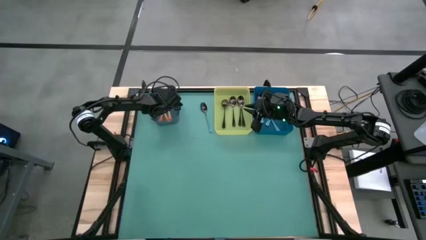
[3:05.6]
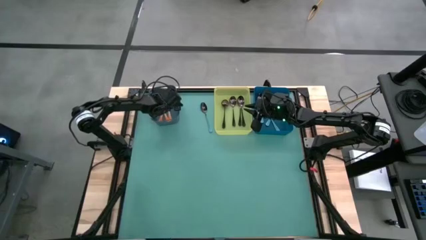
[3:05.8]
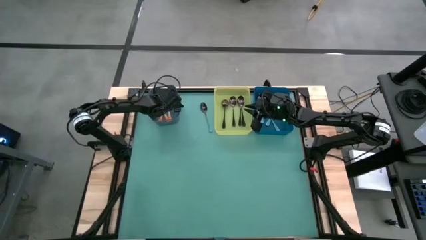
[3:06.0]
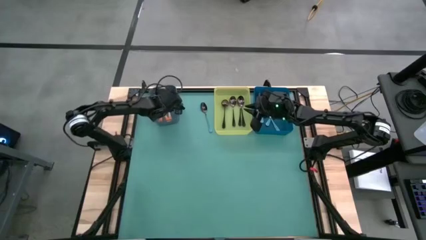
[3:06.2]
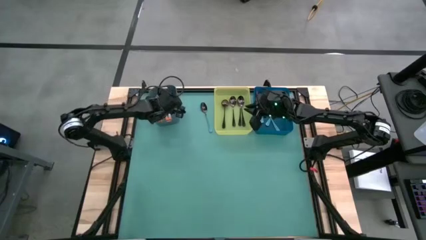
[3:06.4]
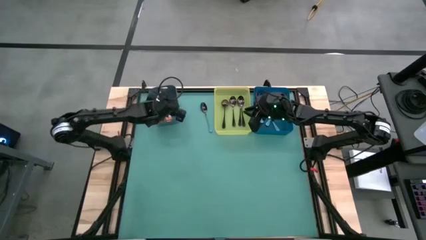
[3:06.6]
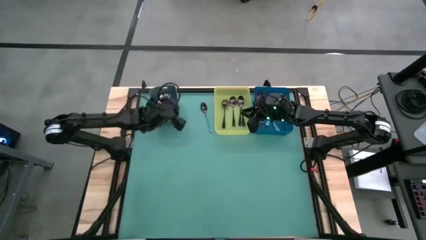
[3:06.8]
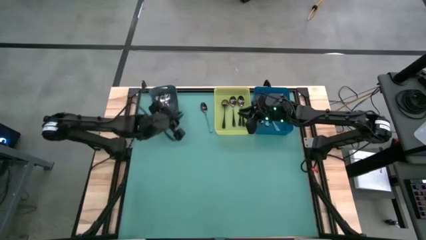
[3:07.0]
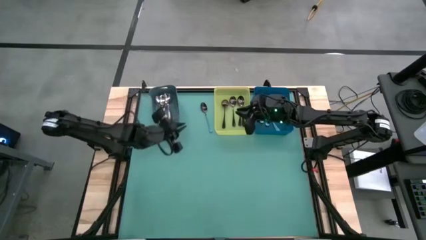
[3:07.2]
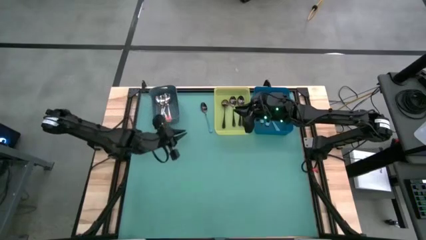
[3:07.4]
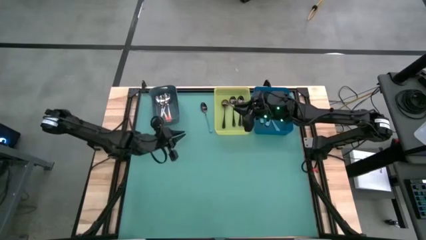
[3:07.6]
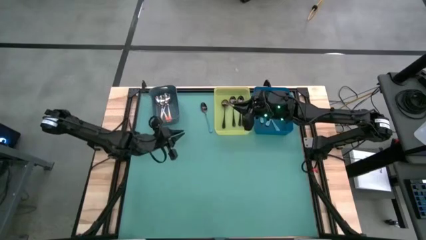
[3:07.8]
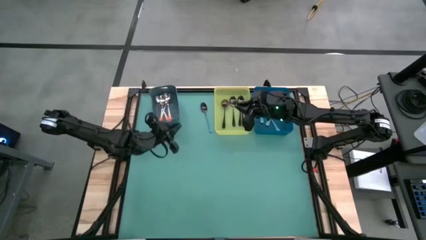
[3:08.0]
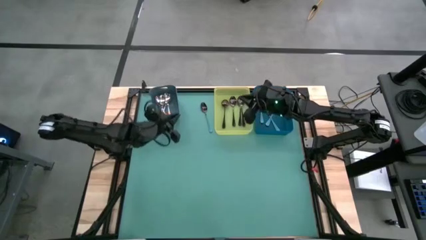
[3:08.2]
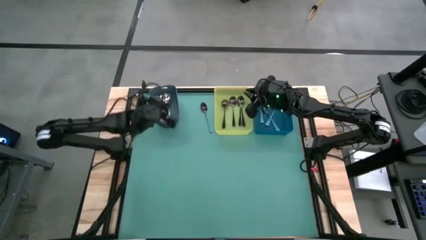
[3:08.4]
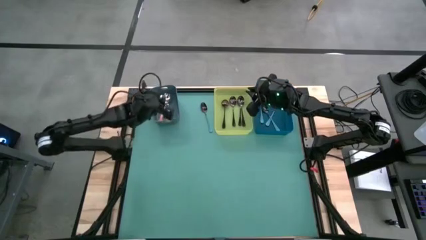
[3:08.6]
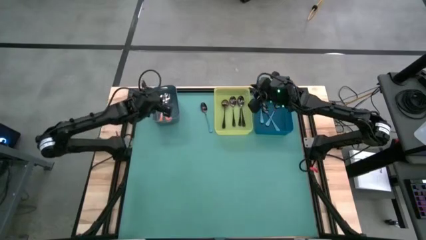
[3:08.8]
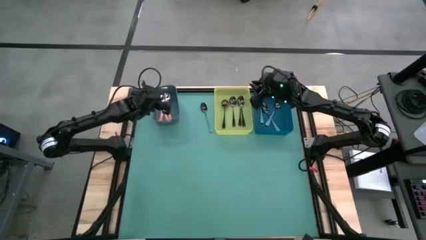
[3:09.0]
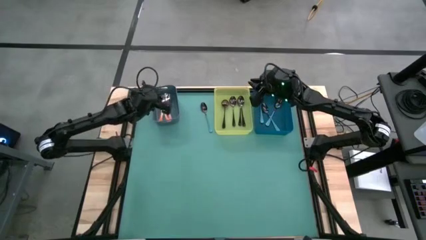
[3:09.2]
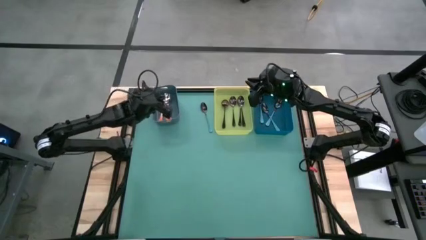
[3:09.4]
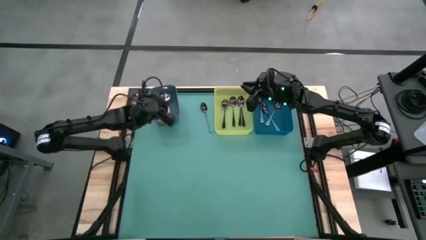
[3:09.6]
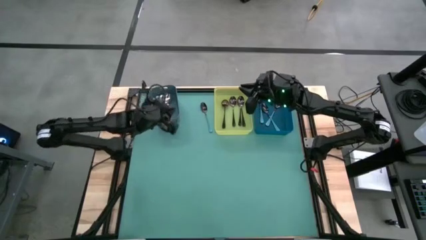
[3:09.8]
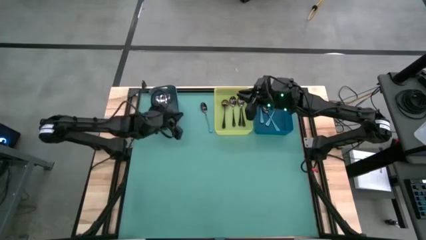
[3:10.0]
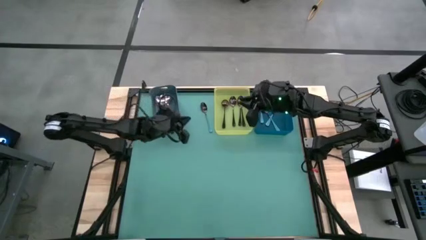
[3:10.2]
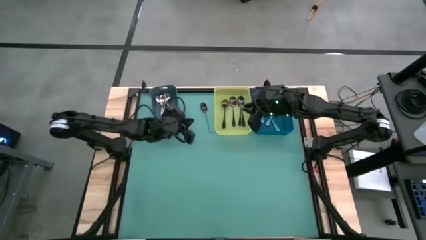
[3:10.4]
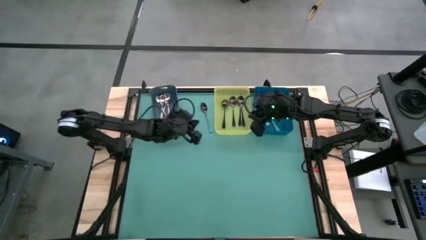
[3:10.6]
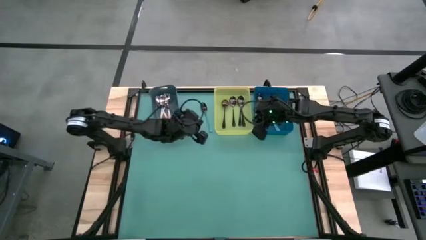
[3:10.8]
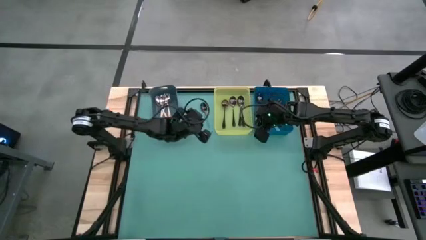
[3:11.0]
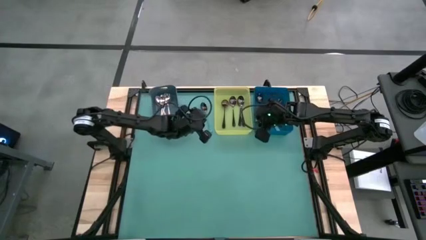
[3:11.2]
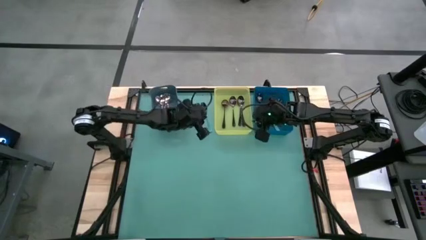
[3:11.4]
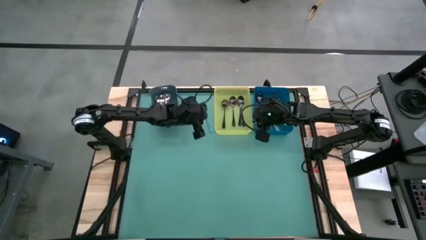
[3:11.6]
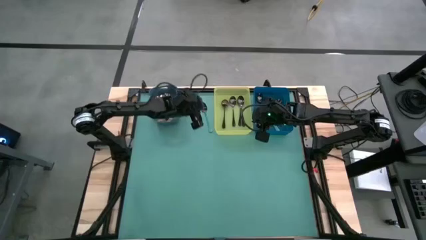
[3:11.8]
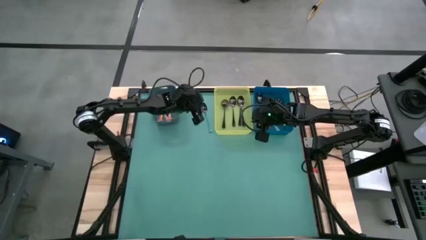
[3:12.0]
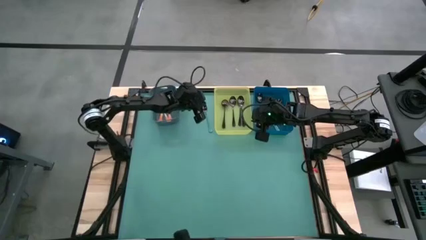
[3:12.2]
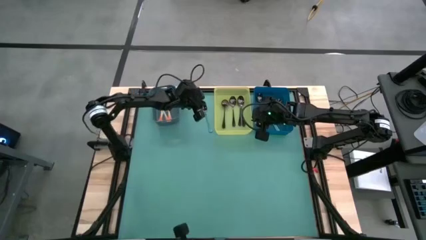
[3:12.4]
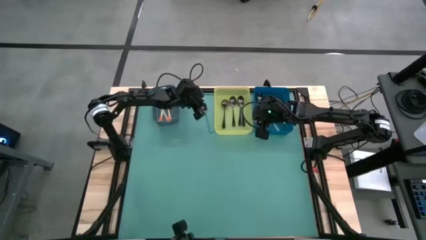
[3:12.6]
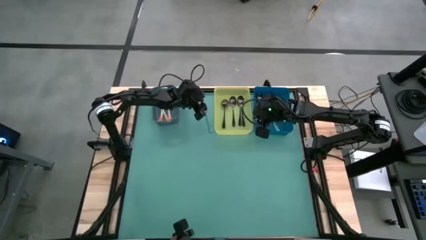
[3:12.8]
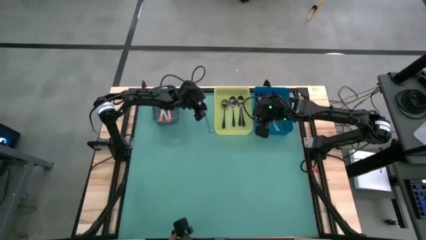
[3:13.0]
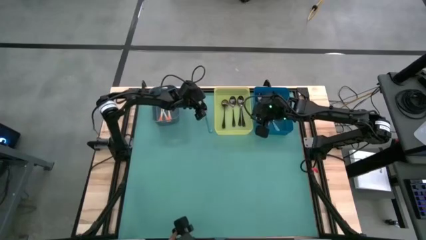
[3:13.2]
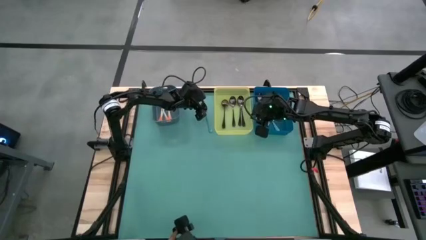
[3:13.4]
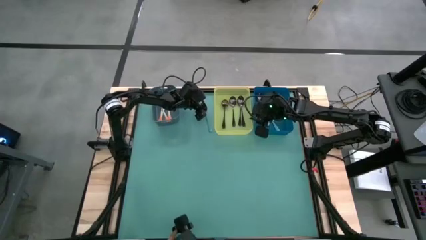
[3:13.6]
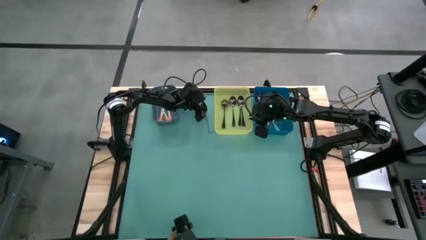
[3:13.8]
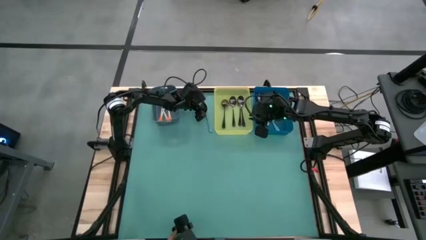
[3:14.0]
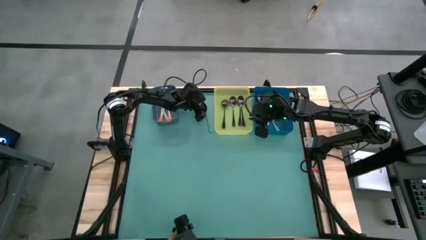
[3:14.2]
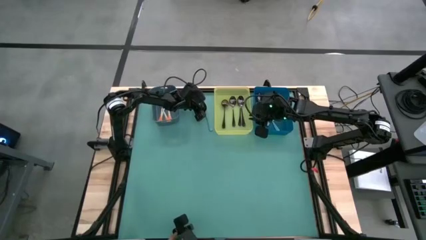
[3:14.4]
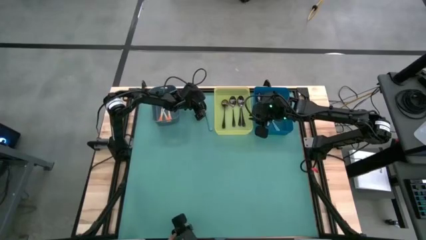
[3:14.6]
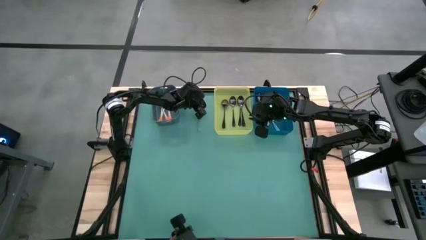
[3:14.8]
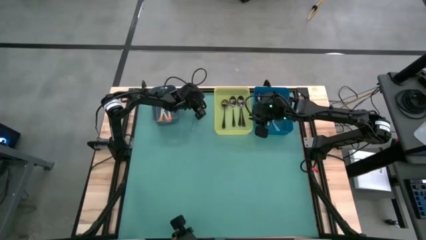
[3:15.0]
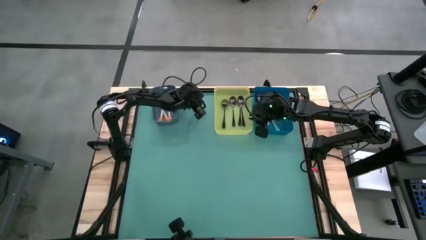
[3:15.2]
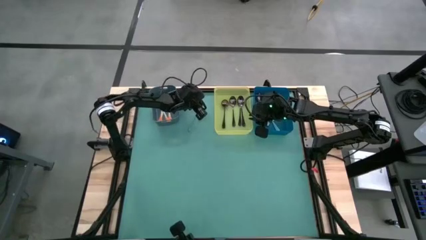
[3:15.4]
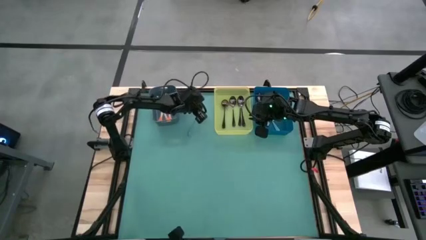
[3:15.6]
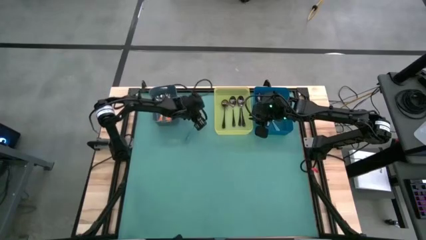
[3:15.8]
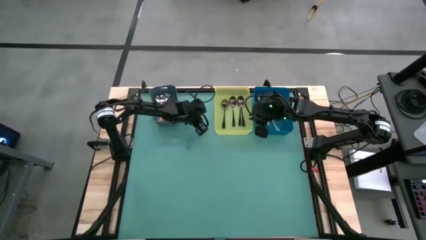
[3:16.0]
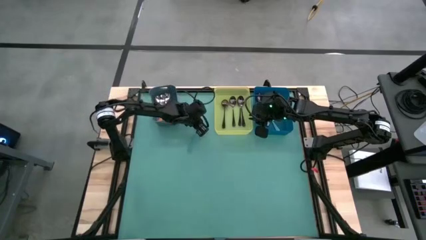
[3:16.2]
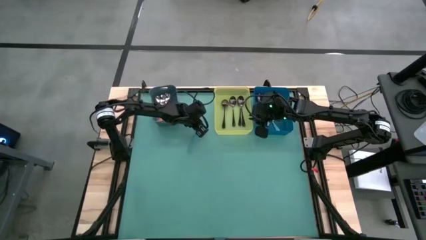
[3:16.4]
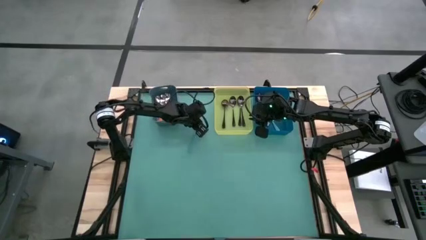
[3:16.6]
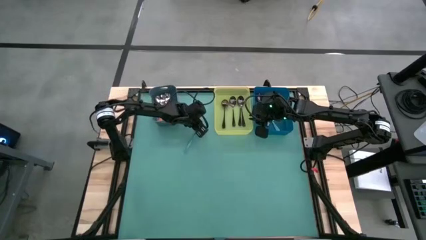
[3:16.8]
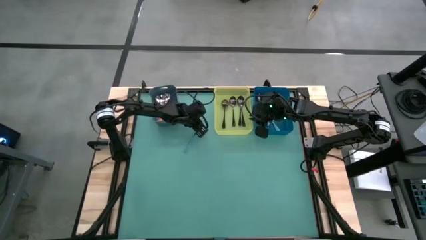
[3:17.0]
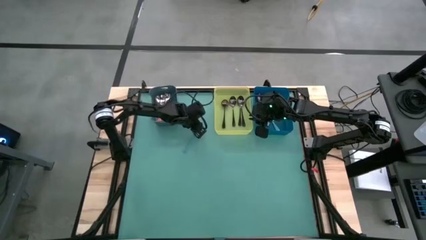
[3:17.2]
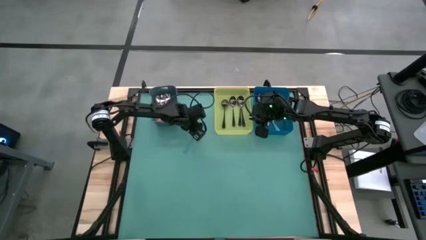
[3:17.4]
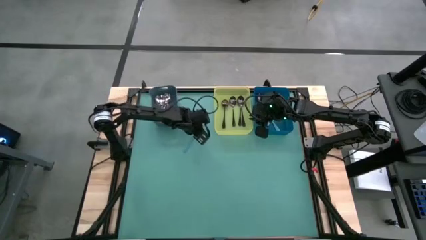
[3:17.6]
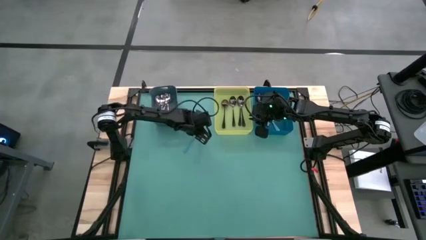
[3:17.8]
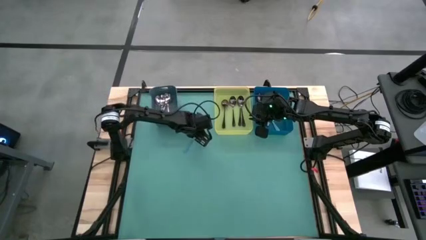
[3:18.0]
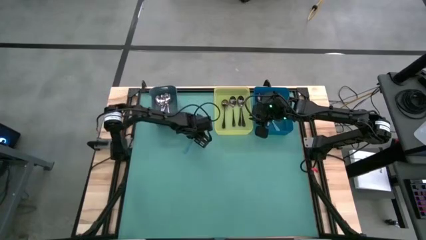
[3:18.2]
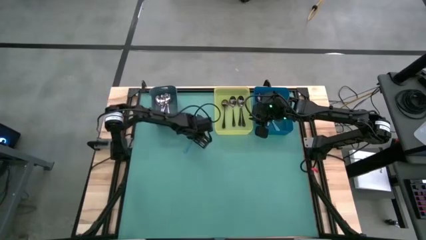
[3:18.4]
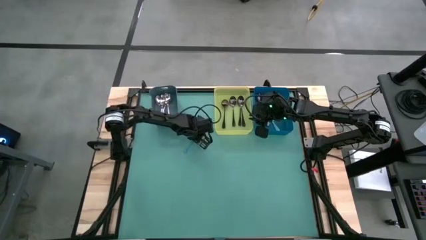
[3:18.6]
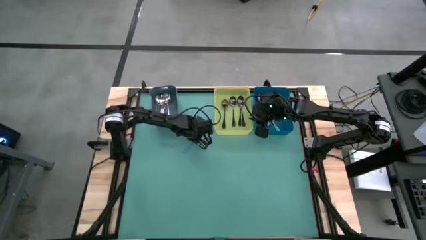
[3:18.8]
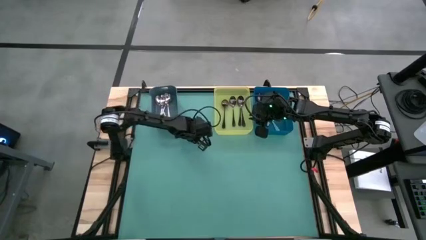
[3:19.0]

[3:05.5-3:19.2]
Task: Sort silverware by color (type)
Put the blue spoon into the blue bin

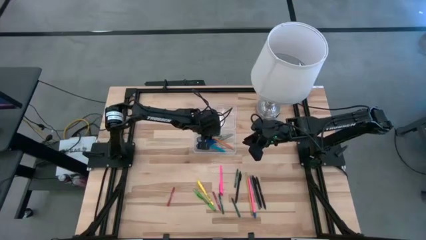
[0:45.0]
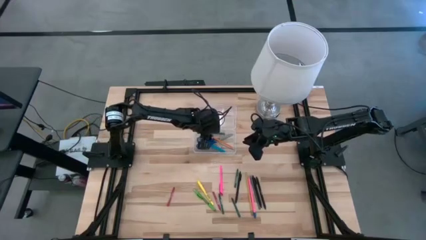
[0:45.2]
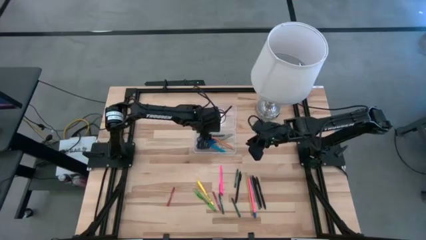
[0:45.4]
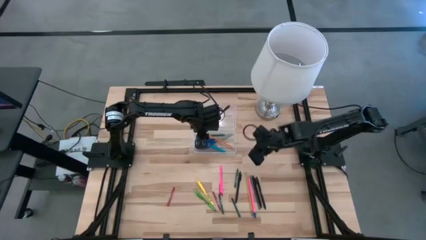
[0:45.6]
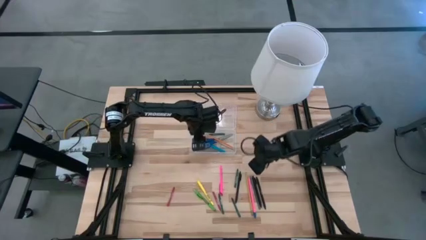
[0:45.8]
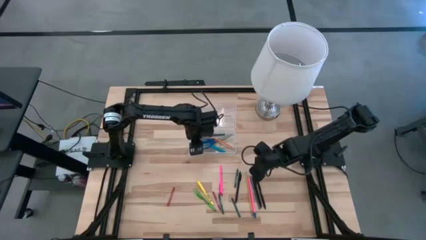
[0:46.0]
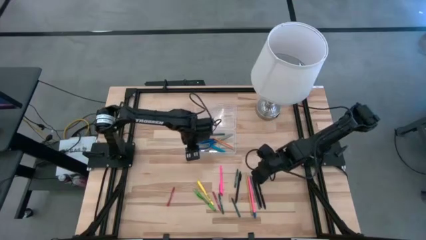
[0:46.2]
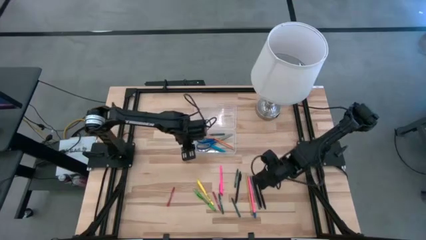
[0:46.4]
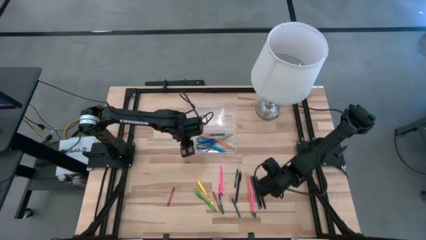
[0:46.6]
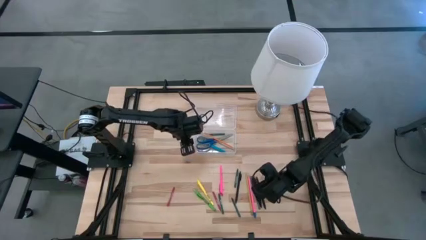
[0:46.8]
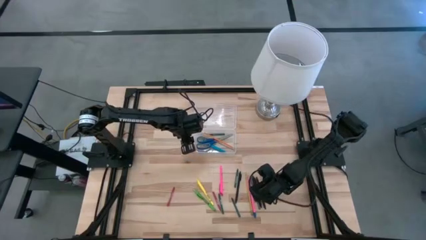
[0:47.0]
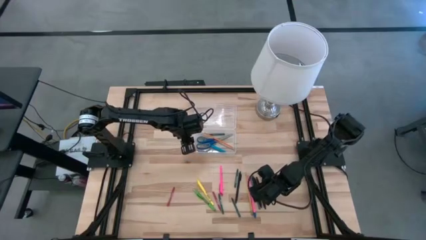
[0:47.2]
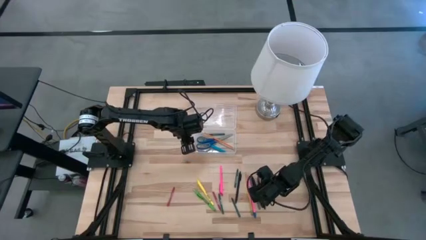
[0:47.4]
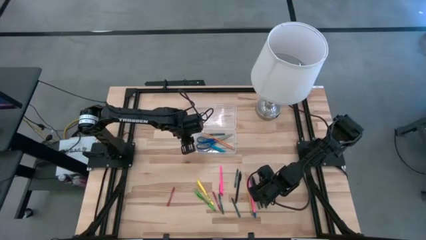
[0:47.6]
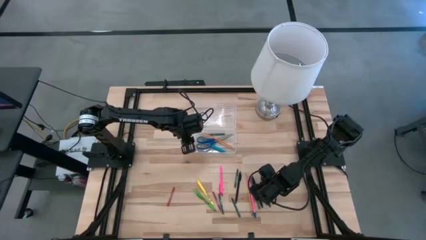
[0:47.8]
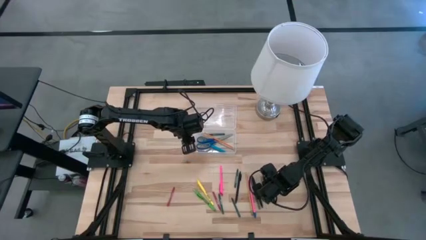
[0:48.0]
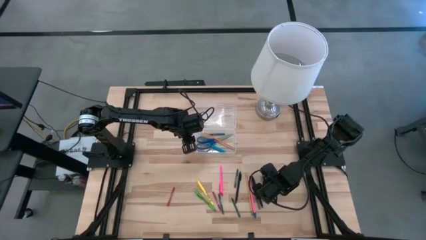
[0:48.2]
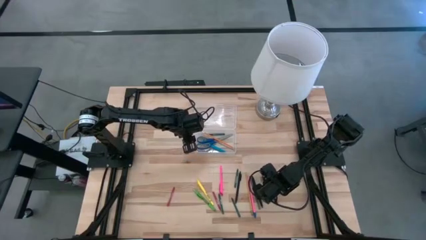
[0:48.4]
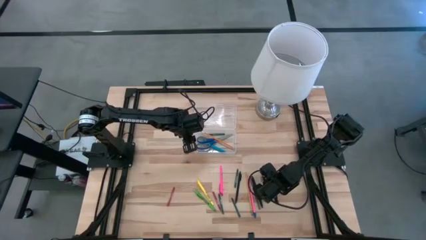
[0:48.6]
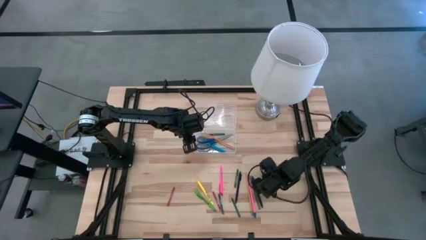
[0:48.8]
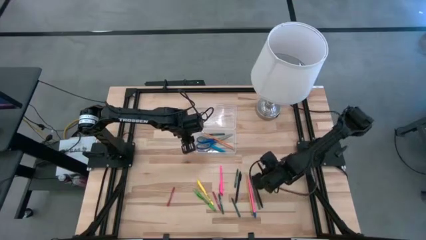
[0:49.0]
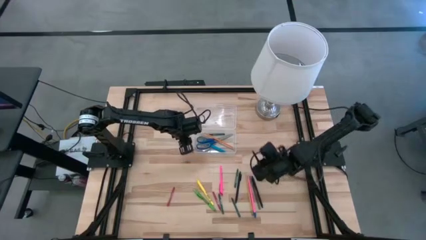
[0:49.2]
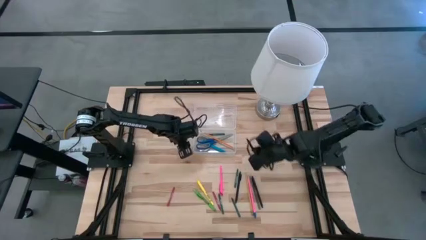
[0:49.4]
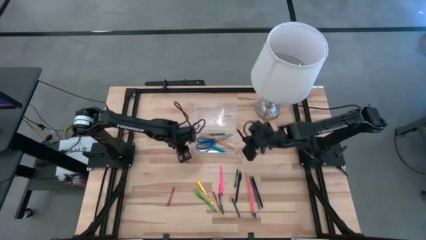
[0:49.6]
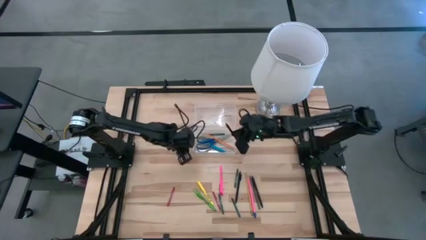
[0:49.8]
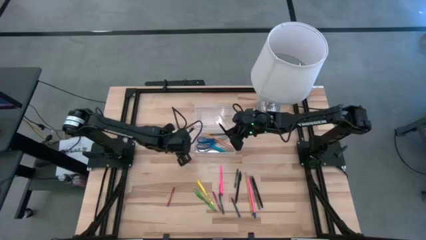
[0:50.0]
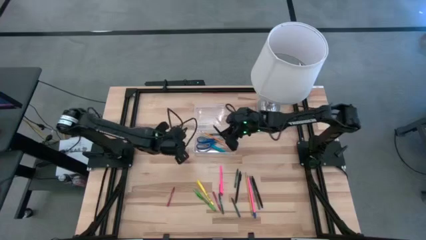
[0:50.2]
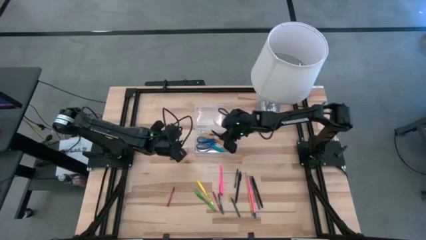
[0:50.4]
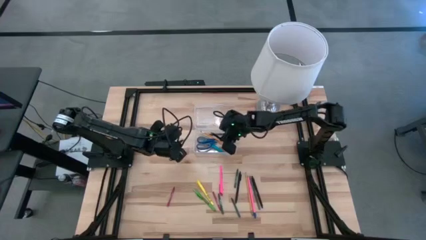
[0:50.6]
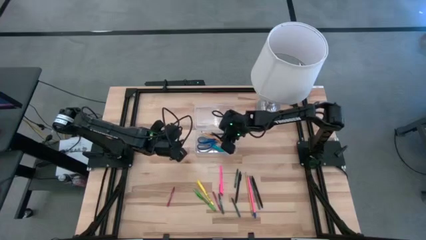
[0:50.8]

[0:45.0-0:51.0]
Task: Pick & place school supplies into a supply box
Put the black pen into the transparent supply box
